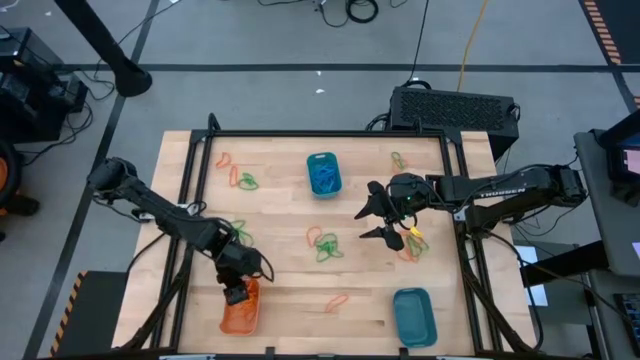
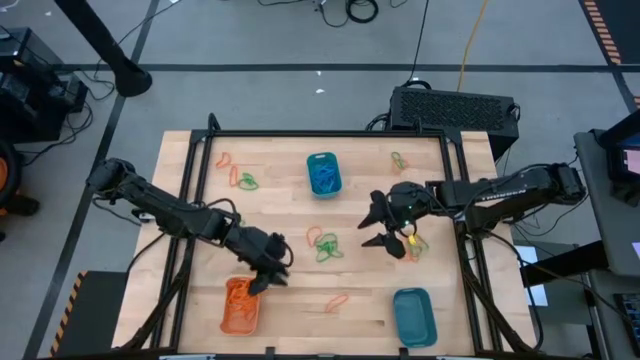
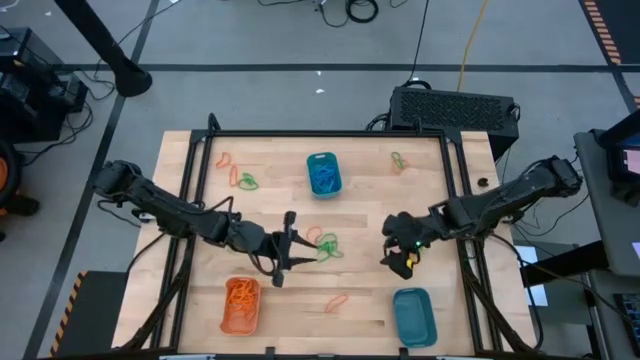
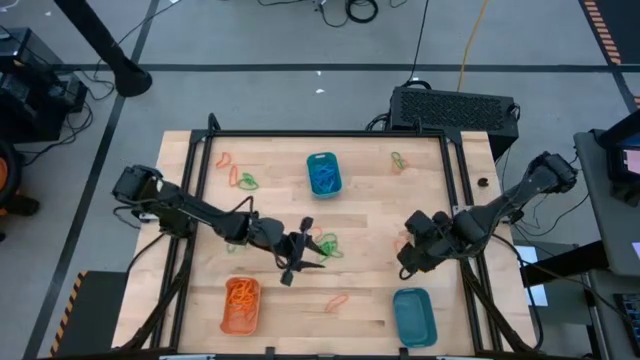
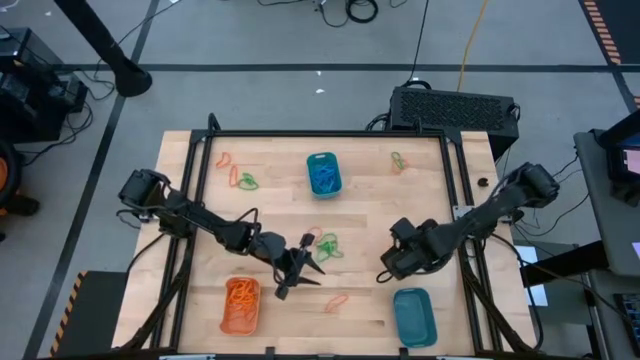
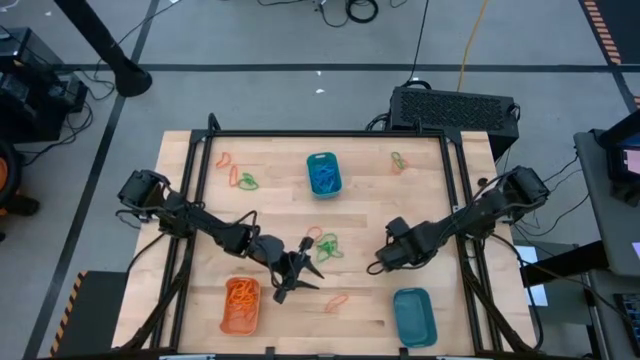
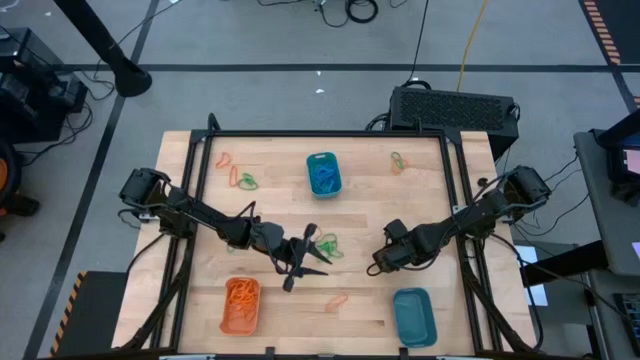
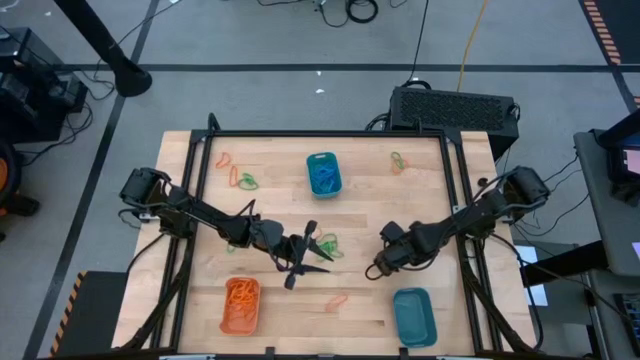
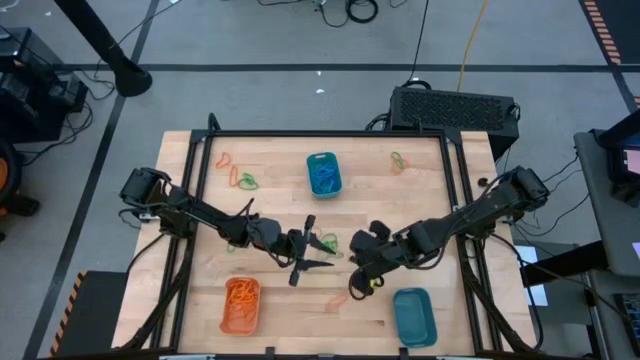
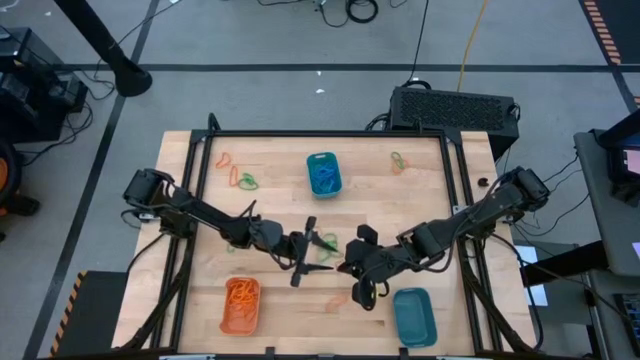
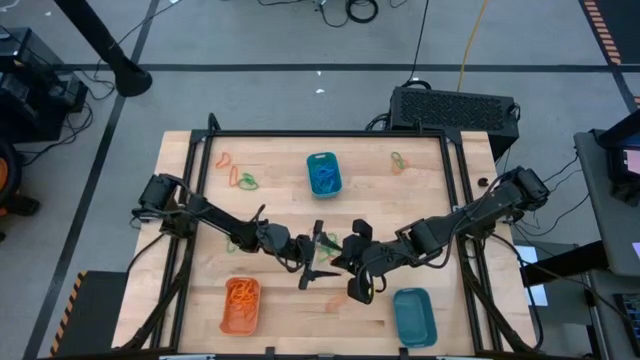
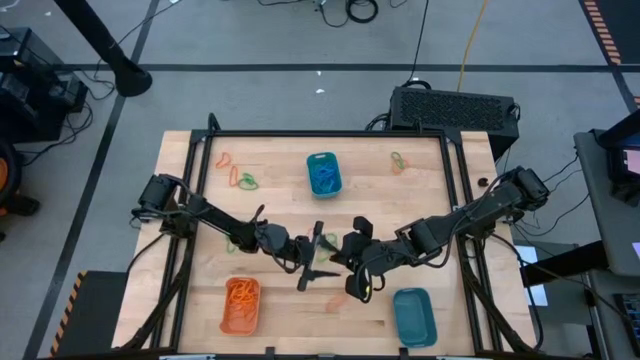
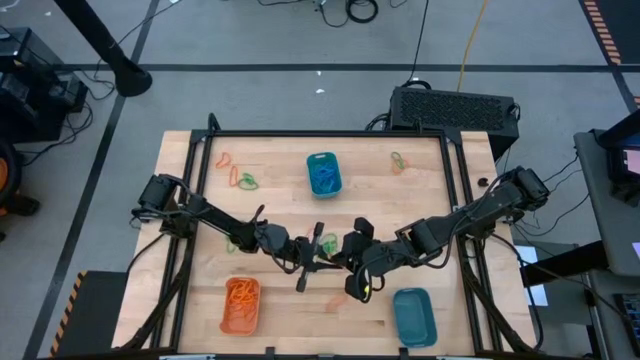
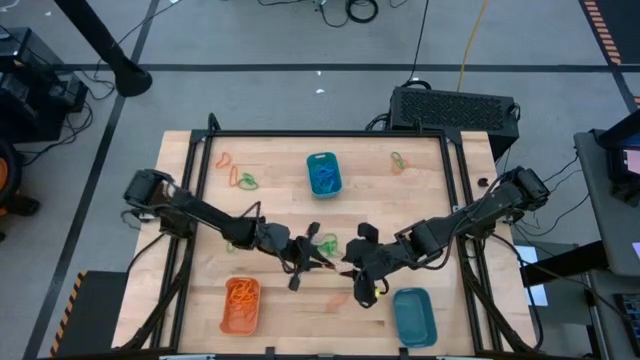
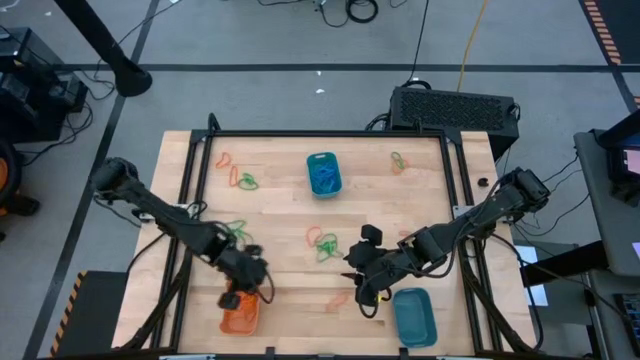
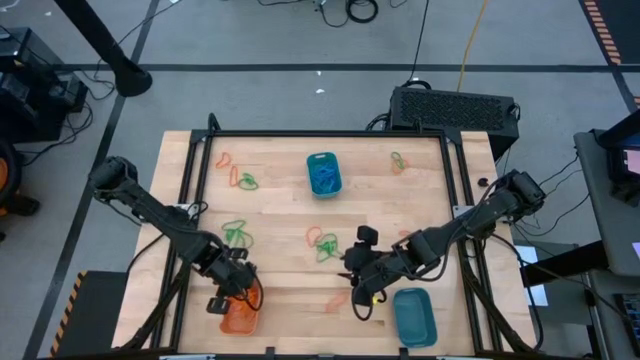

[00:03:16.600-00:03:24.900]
Task: Sort rubber bands into baskets
Put the orange rubber band into the orange bin

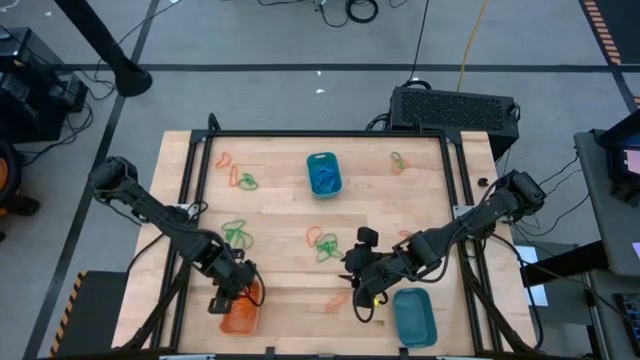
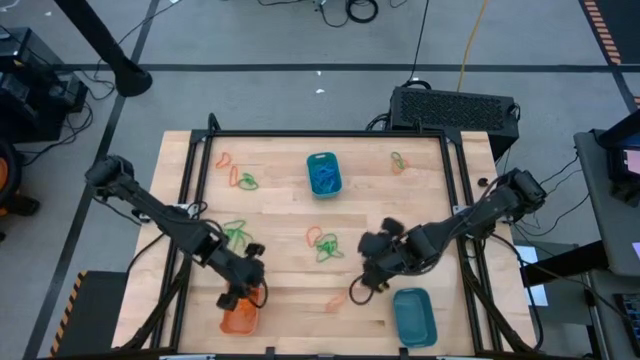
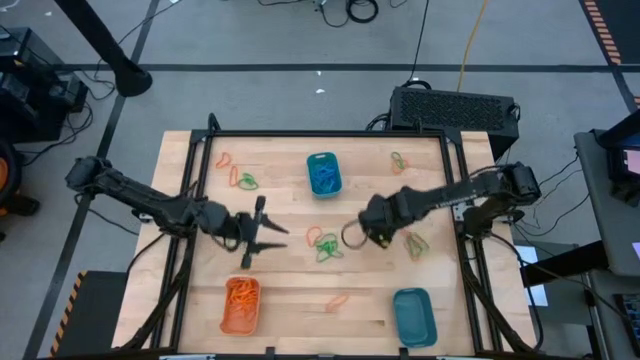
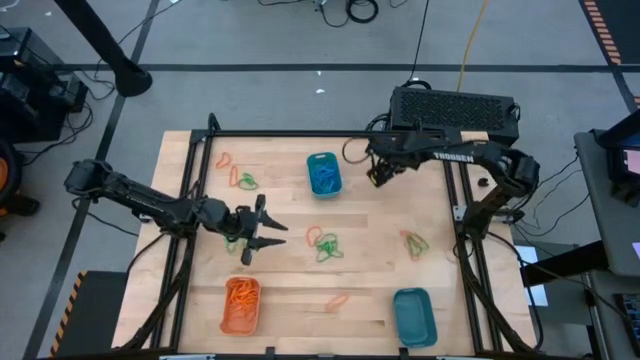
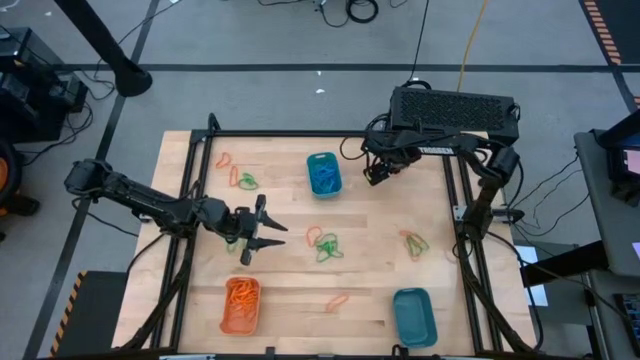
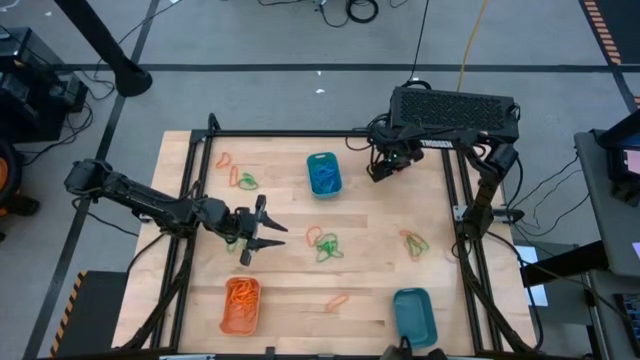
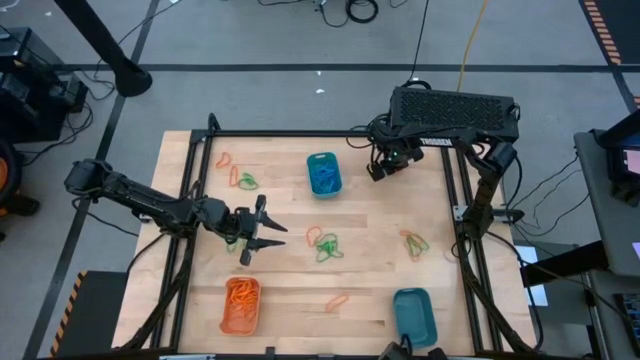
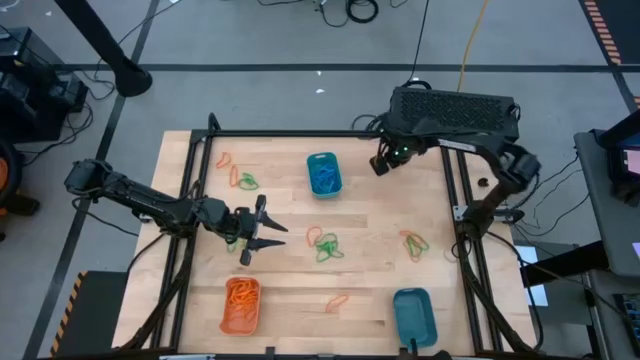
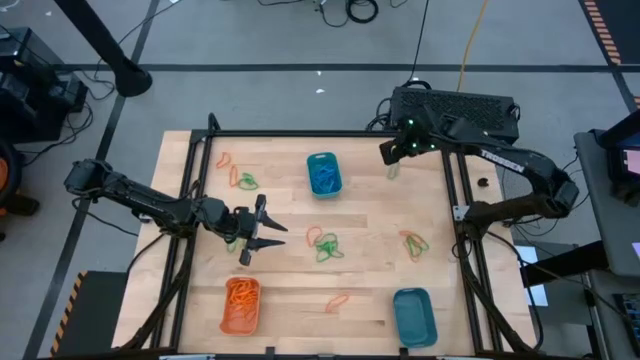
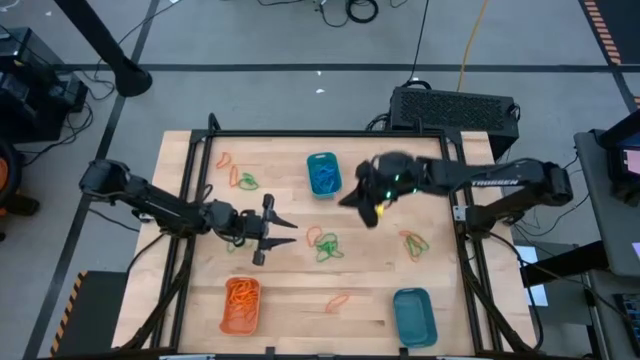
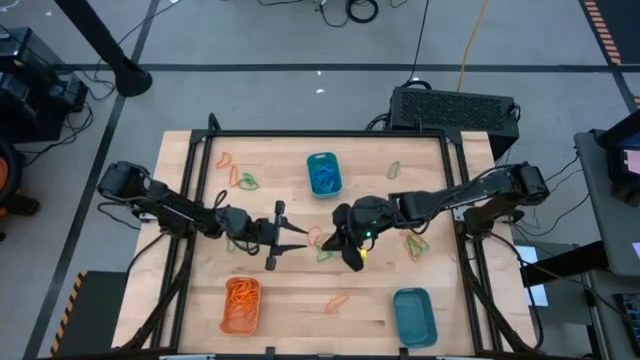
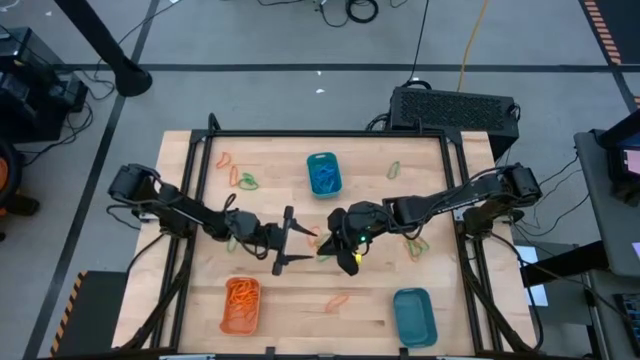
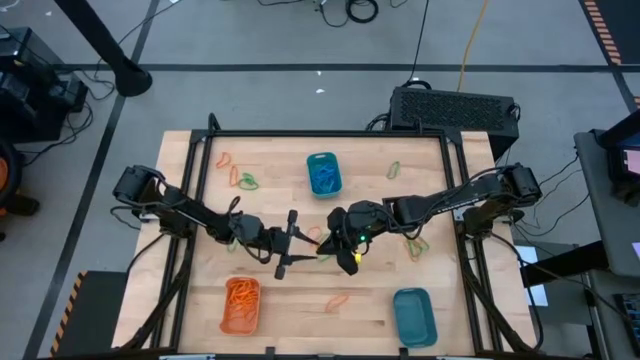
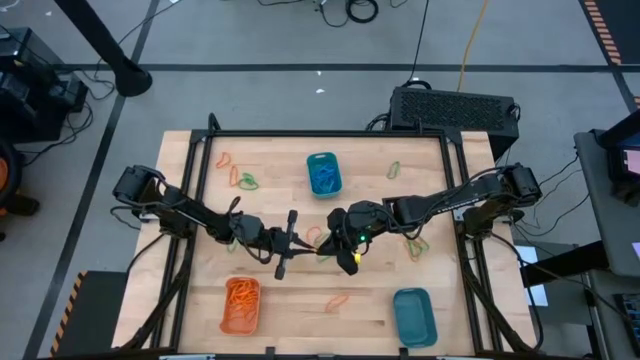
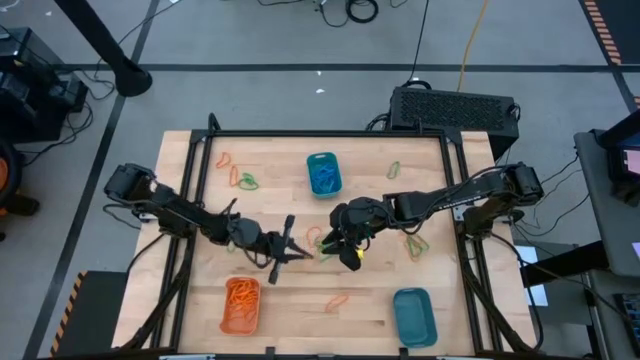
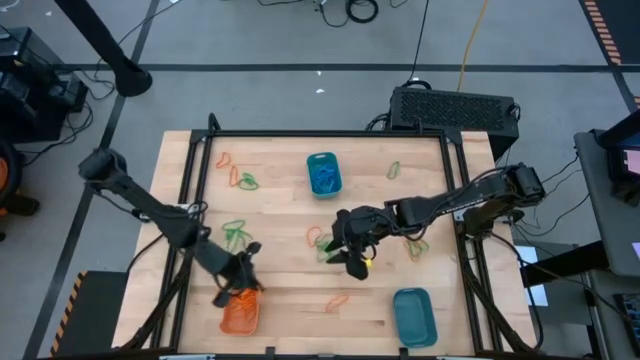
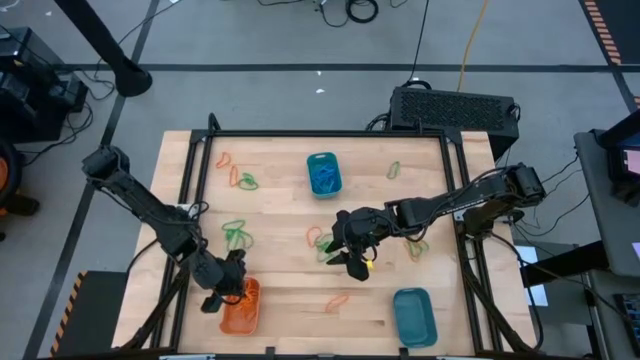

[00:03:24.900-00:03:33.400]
Put the orange rubber band into the orange bin

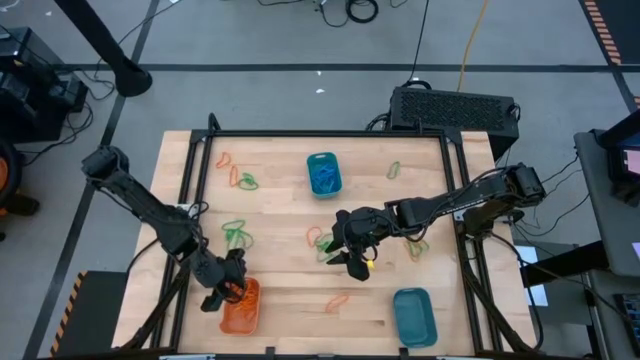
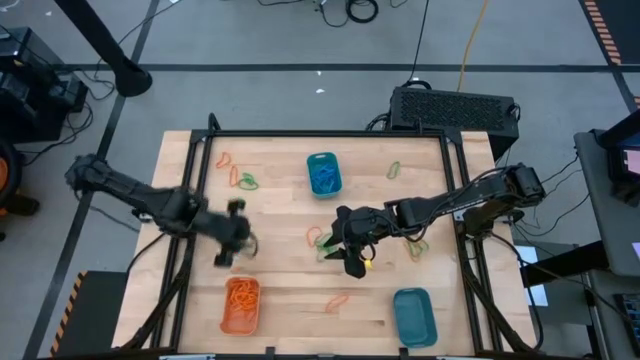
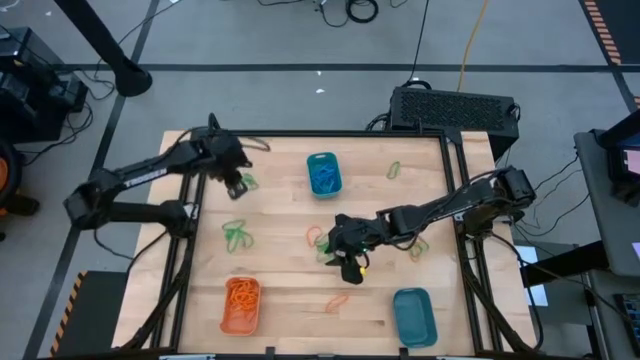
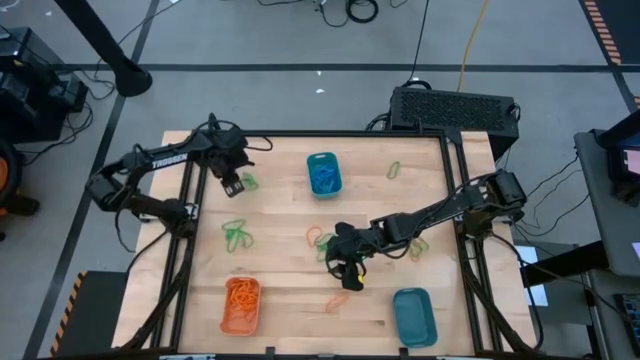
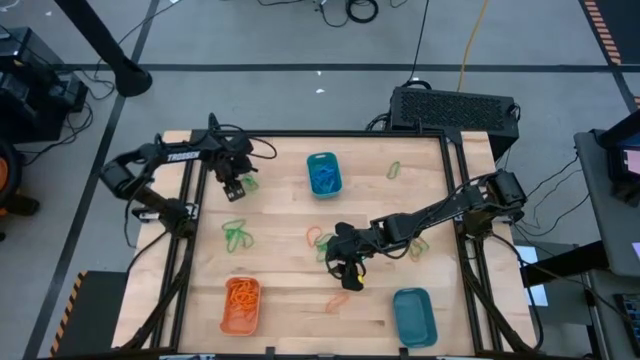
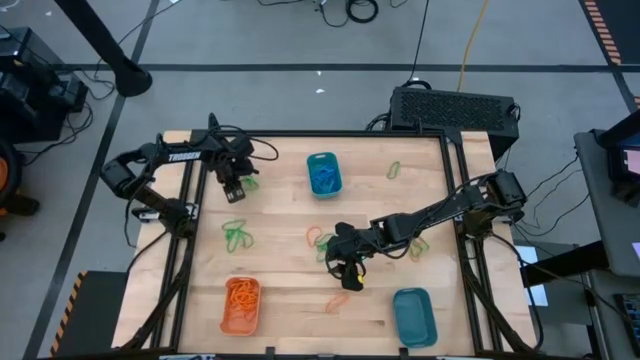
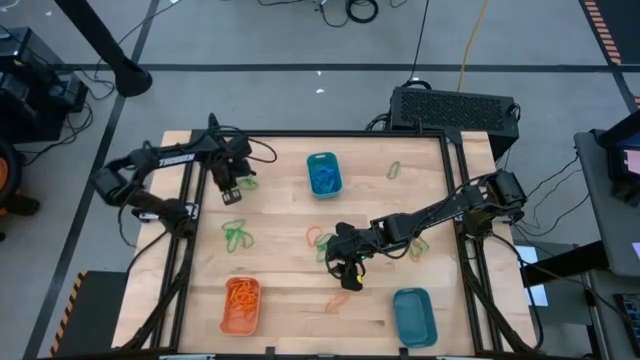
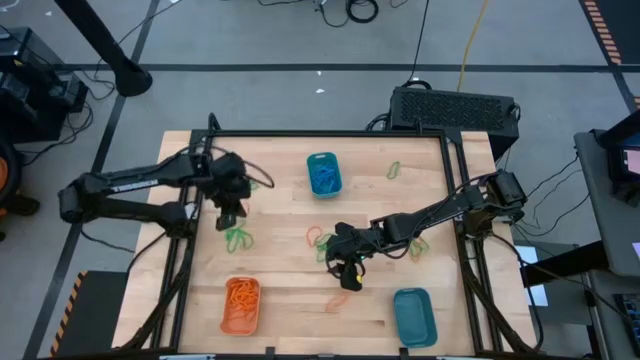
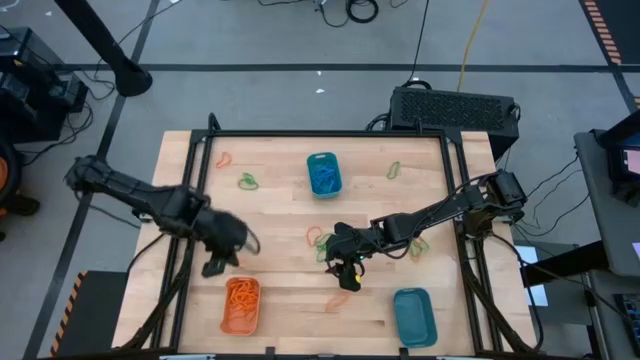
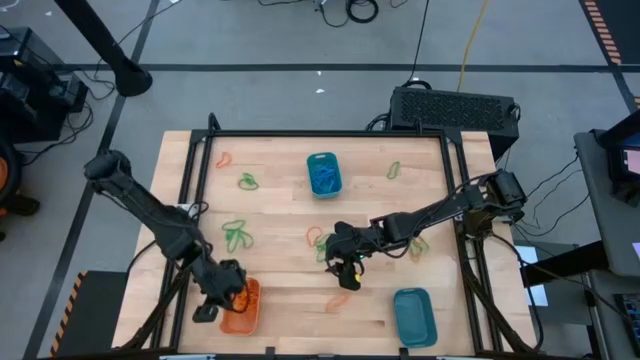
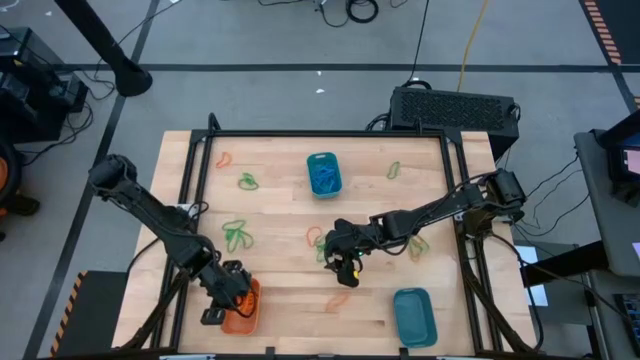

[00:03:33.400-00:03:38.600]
Put the orange rubber band into the orange bin
